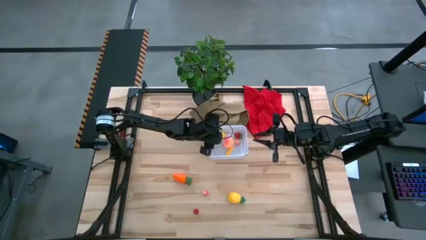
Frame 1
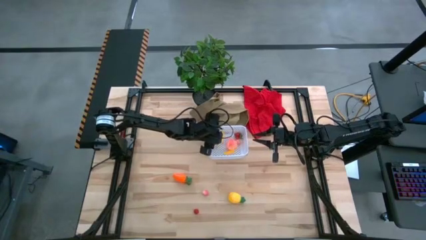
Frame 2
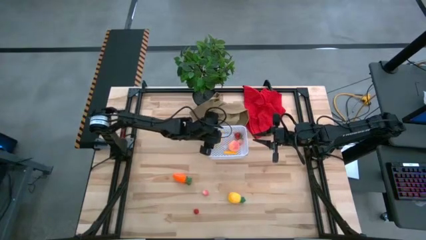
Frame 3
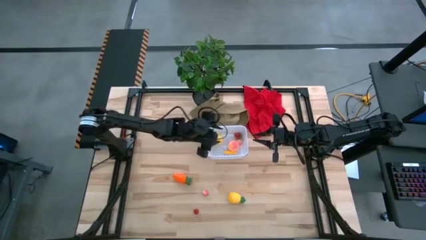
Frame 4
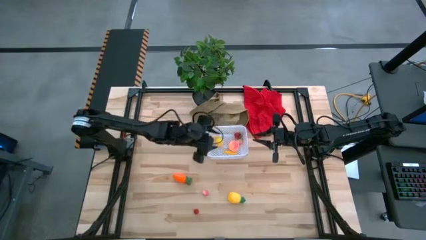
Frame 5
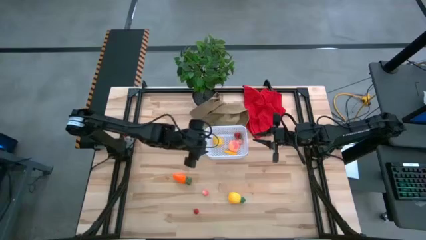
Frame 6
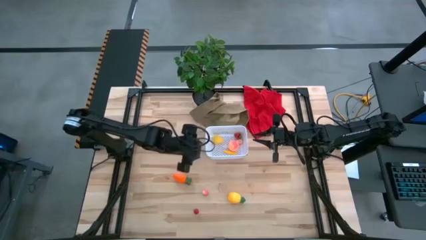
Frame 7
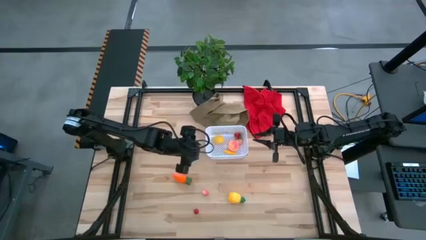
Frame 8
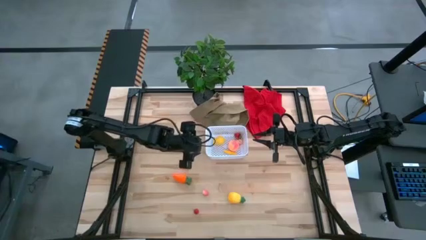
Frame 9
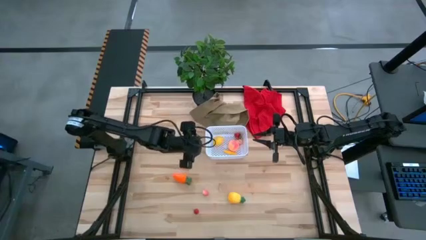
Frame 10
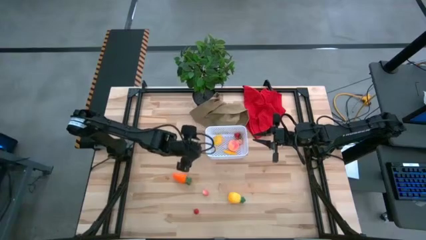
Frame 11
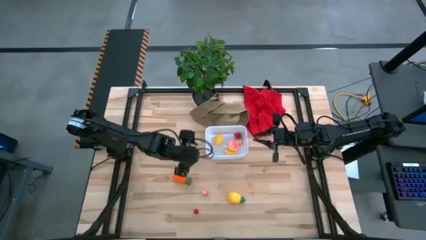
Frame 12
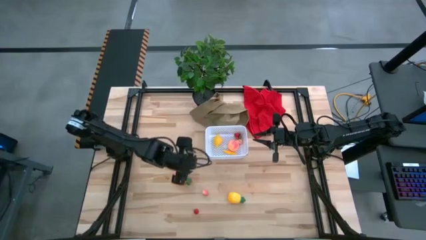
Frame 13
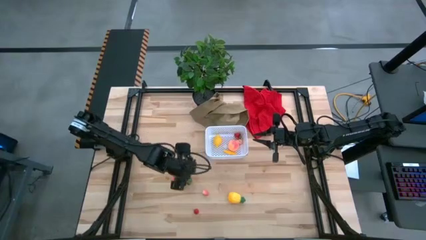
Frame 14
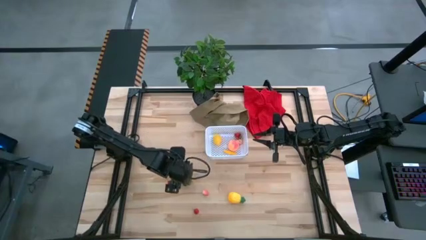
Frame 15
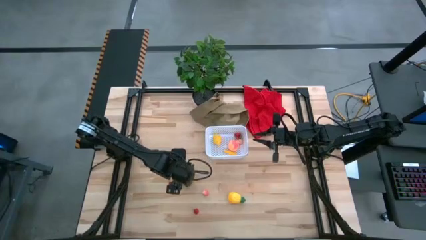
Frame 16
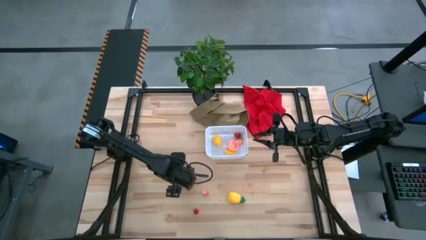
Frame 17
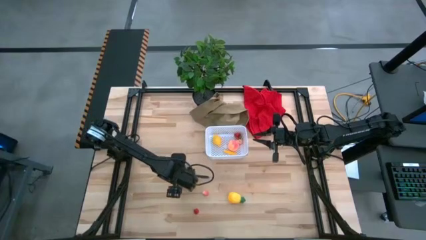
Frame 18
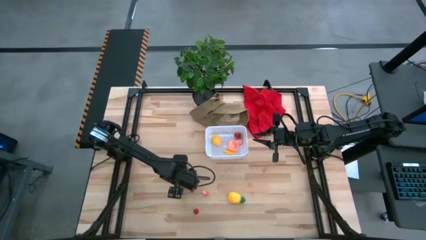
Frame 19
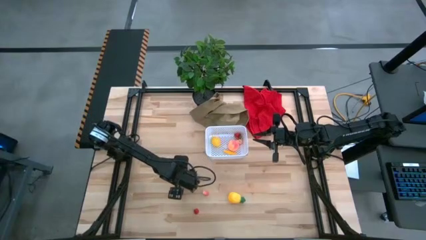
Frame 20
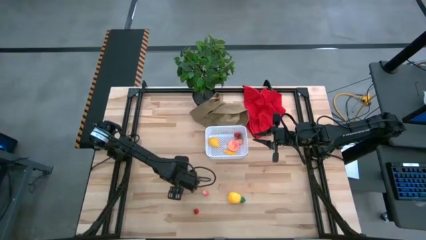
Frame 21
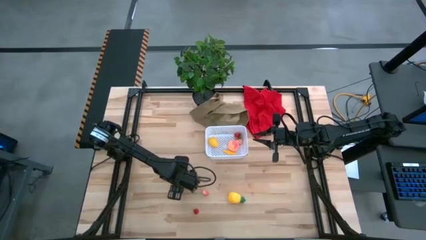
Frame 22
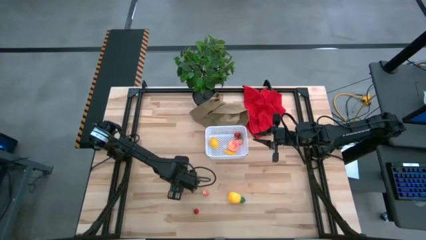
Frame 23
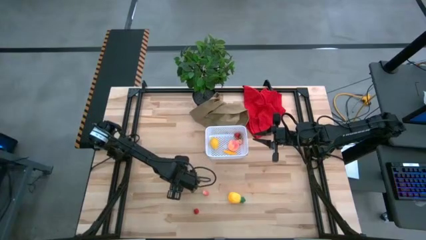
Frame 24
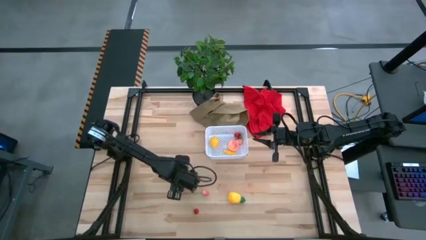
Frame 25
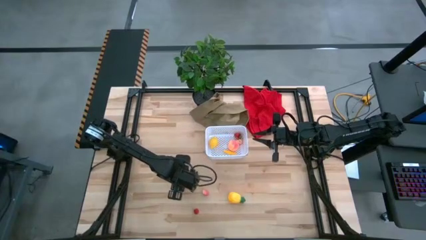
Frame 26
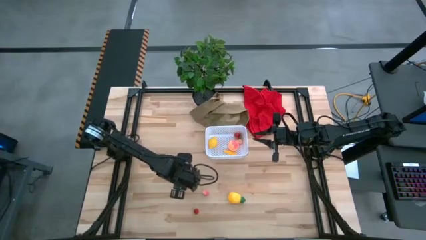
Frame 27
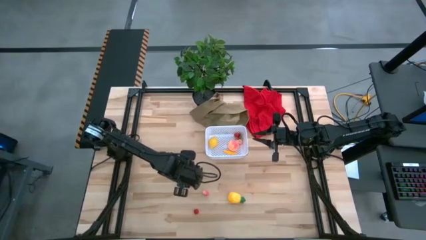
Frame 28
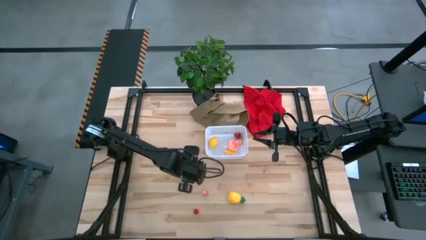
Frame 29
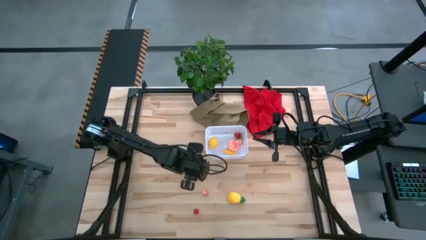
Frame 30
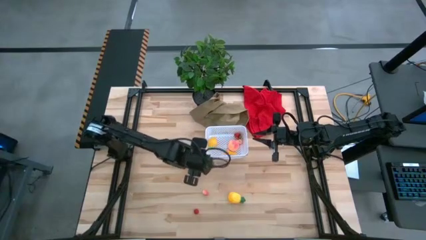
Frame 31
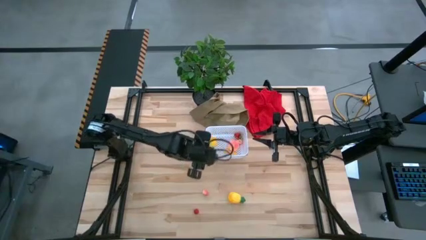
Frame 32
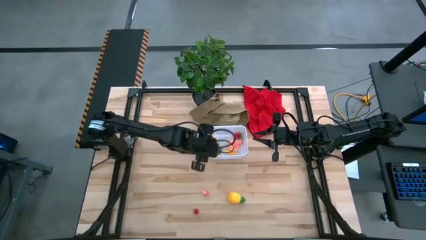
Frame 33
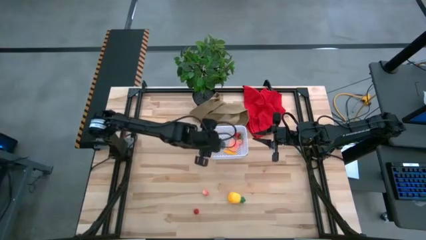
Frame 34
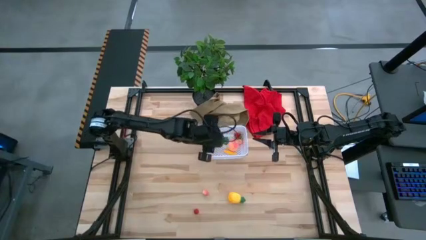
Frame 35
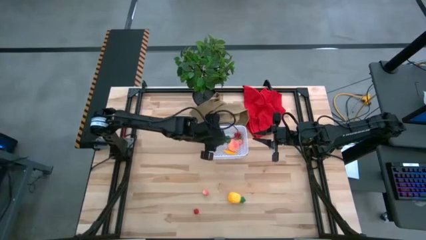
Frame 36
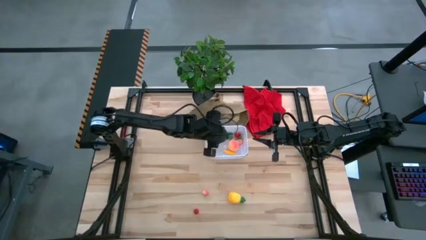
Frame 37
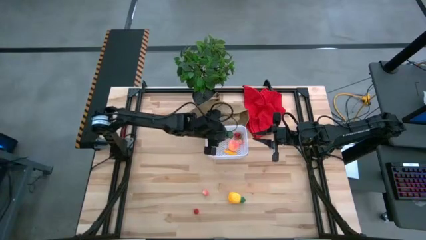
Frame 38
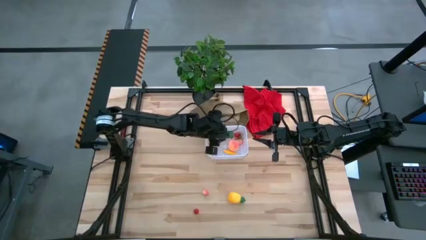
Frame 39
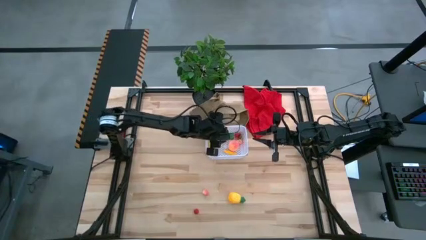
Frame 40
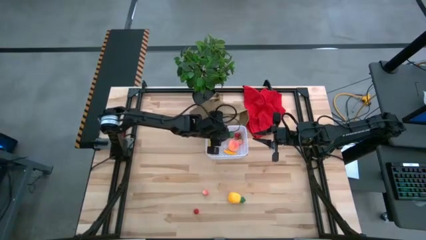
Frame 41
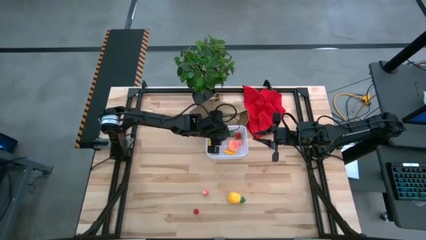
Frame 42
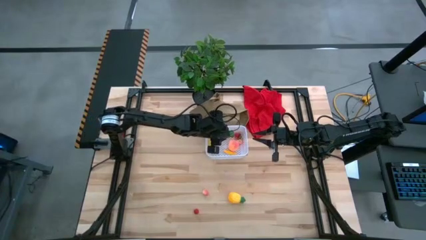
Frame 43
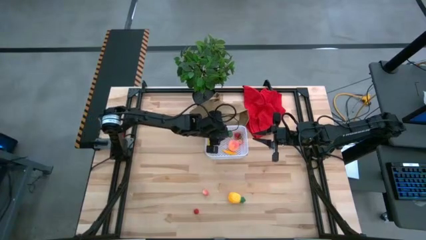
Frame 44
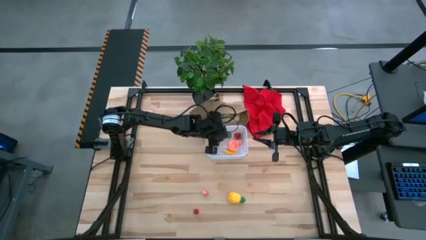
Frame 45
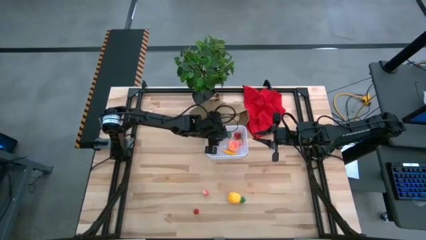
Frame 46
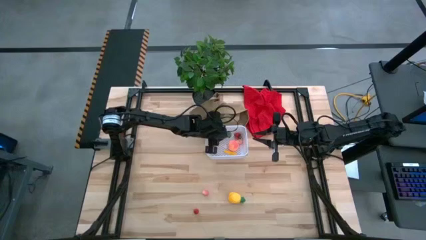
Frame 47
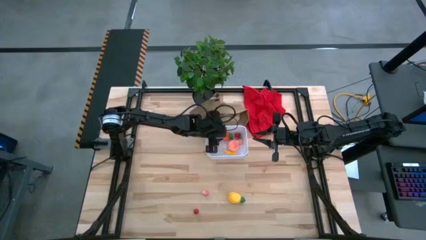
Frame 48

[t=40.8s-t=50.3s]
Task: Pick and placing Produce into tupperware
Put the carrot into the bin

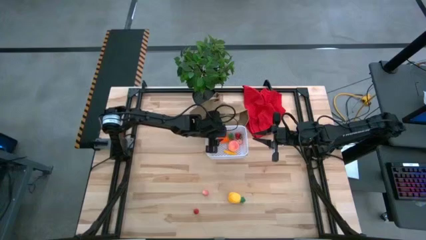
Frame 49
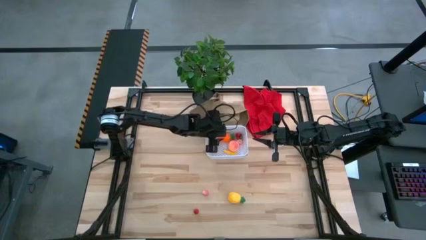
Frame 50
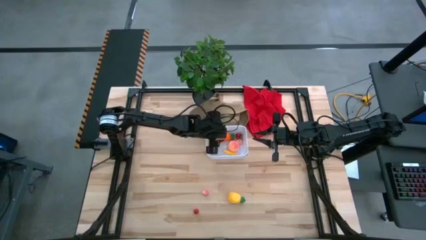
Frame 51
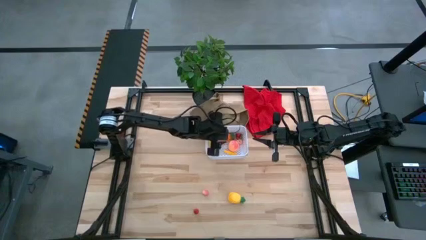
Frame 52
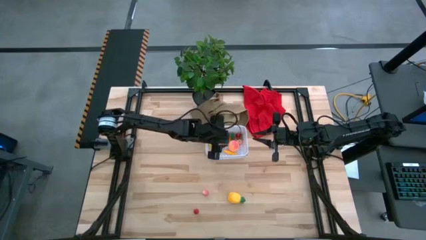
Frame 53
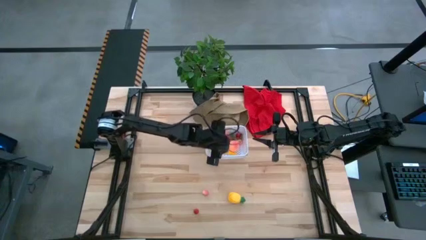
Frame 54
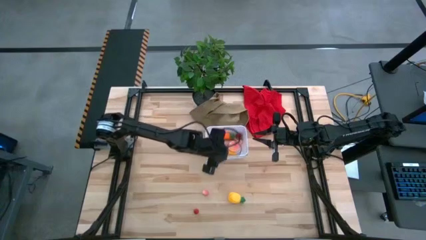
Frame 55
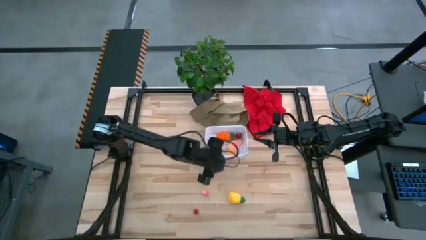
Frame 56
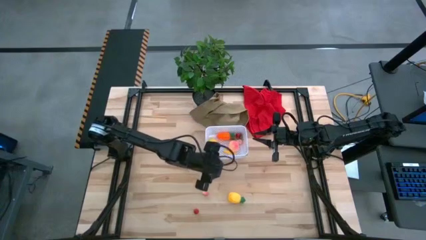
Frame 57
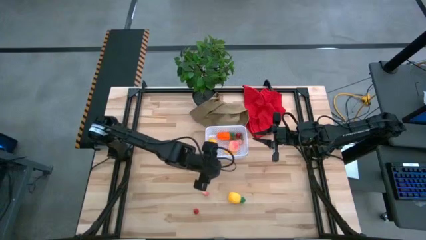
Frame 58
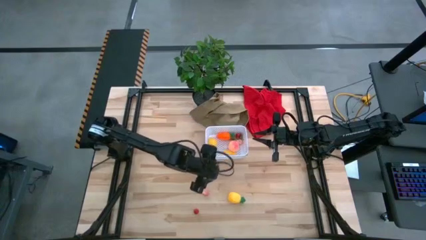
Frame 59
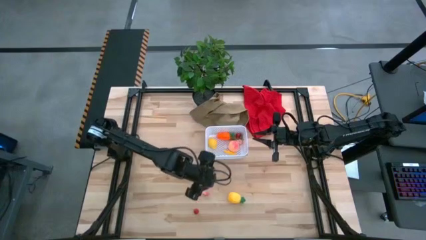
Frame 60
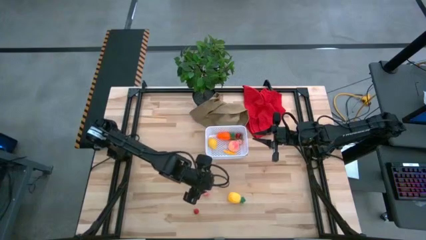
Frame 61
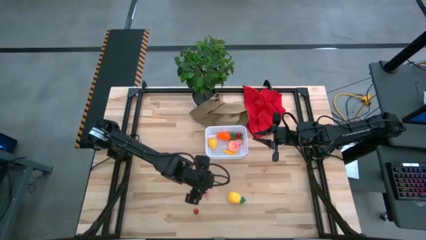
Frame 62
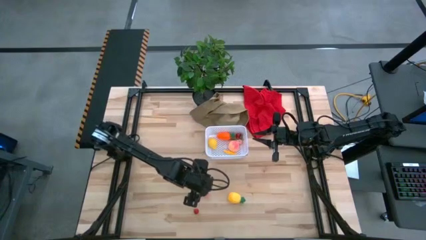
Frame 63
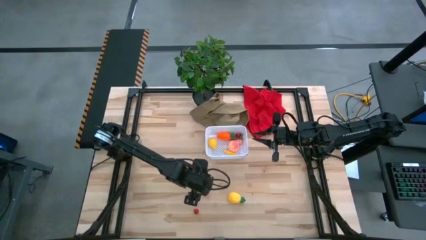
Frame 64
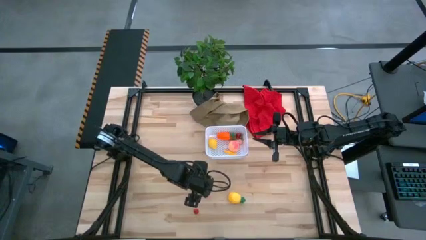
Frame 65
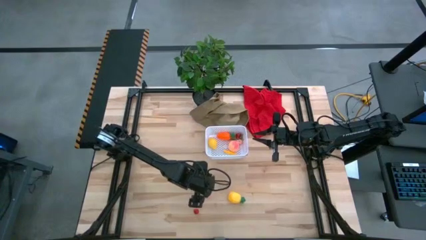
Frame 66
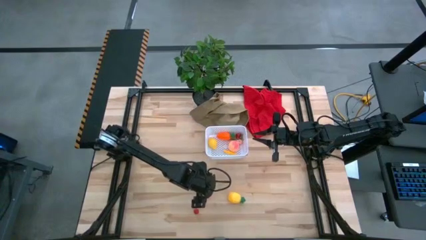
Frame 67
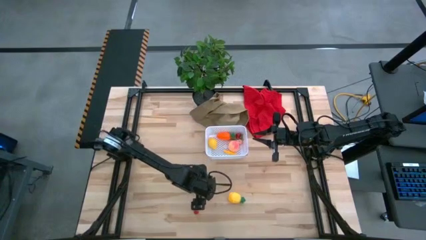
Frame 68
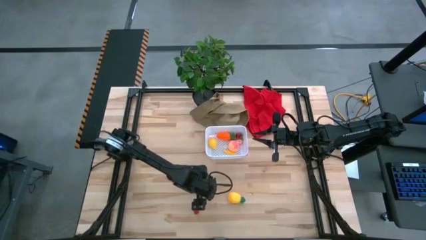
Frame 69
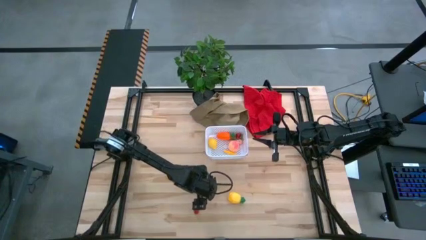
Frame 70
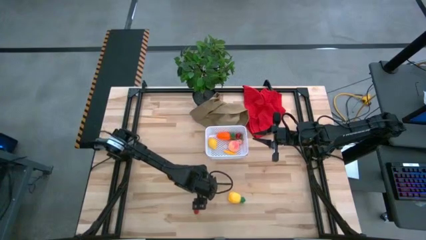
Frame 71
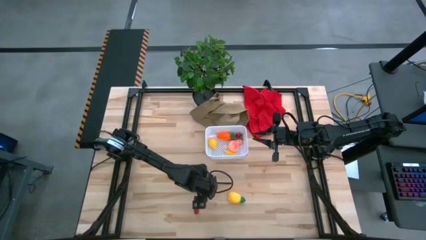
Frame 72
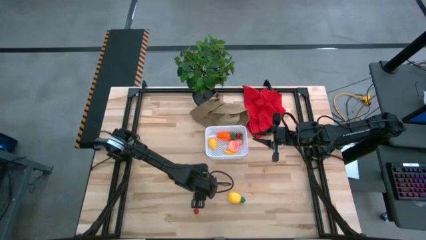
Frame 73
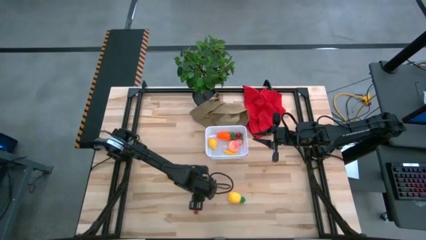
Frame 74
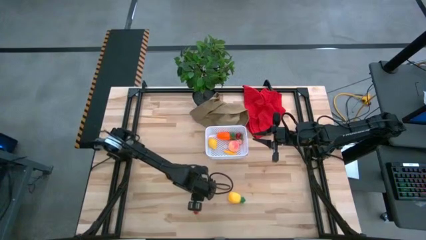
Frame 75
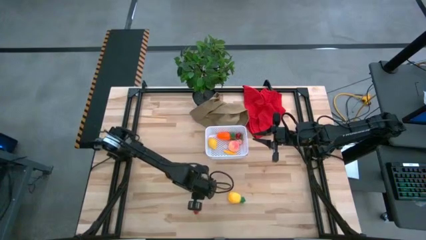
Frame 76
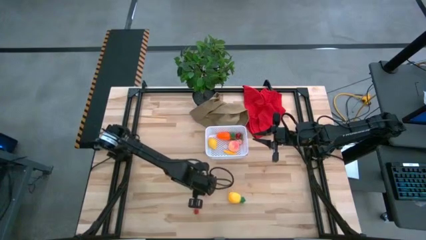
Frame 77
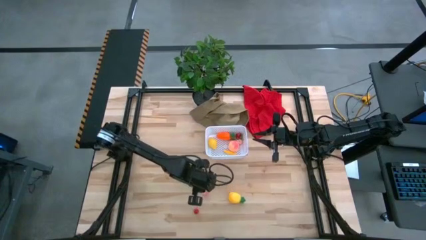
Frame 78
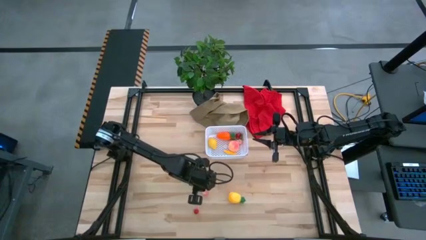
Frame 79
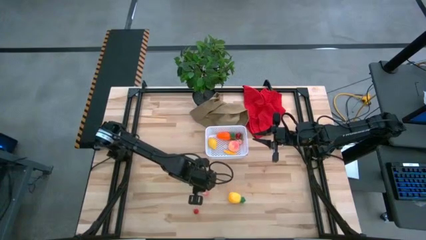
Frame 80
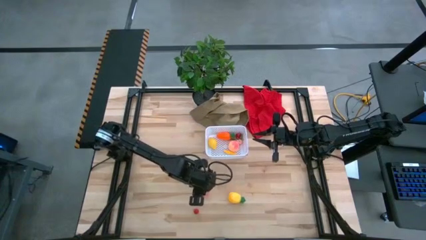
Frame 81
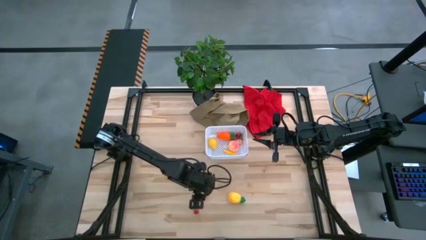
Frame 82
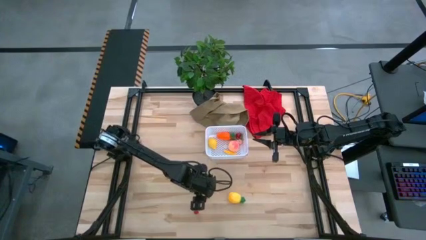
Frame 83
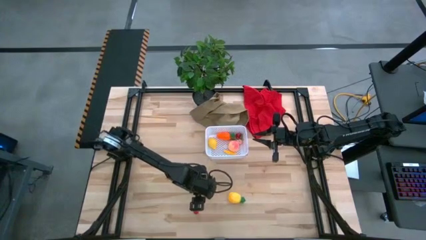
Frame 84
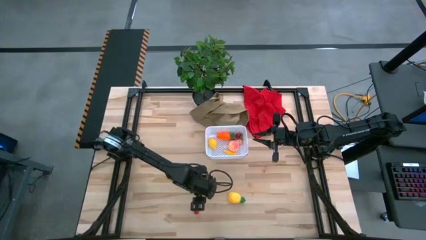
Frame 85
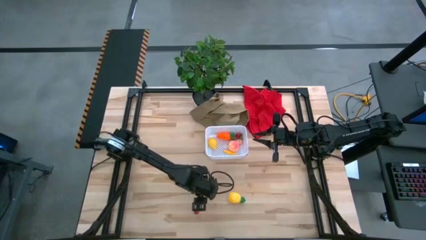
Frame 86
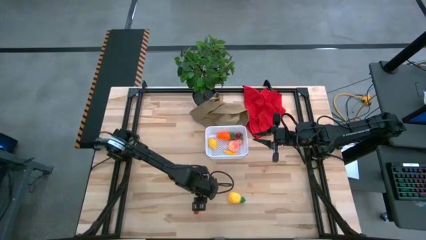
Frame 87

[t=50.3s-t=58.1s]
Put the pink peach into the bin

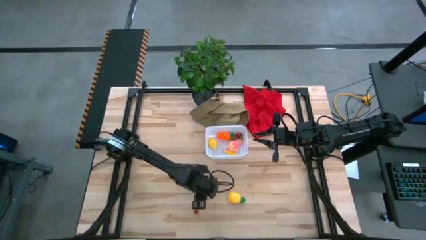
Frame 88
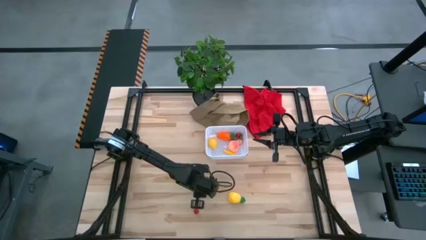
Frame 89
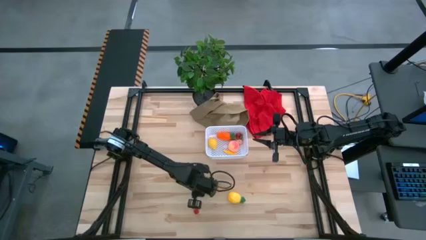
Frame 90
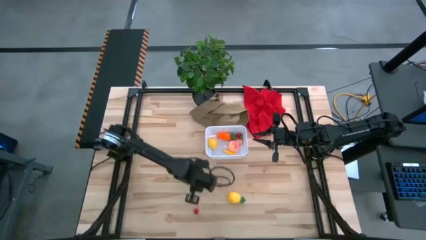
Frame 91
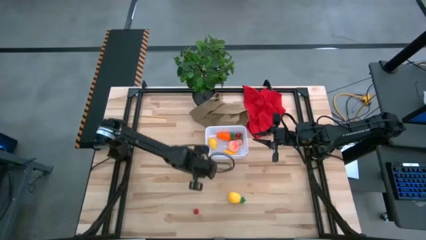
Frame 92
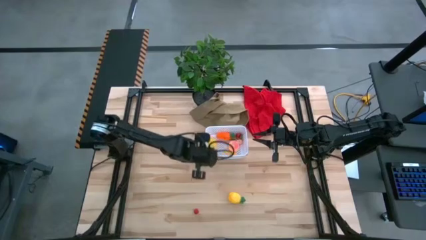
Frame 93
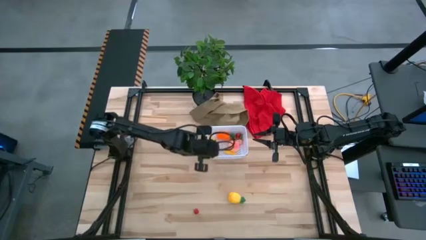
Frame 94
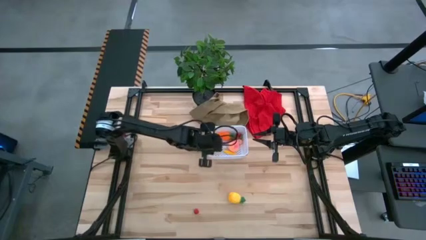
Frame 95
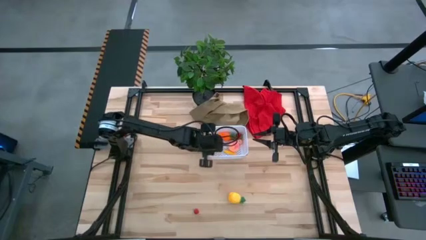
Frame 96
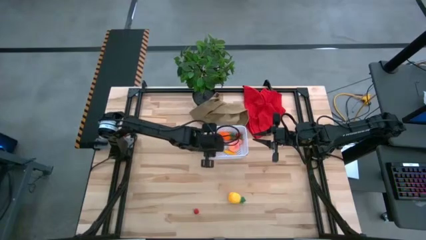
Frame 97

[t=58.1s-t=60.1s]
Put the pink peach into the bin
